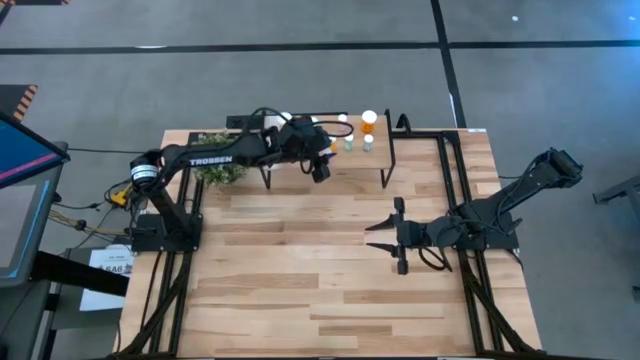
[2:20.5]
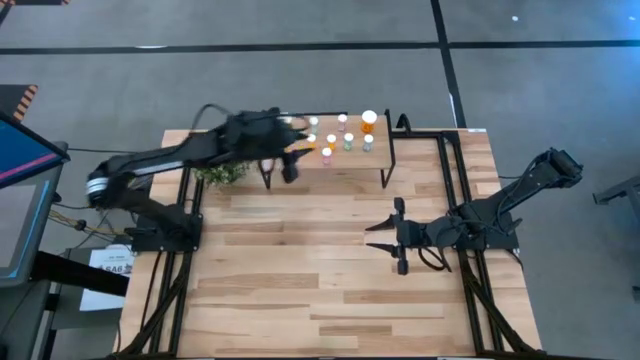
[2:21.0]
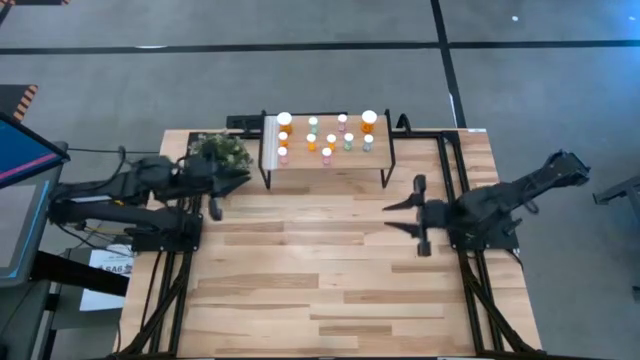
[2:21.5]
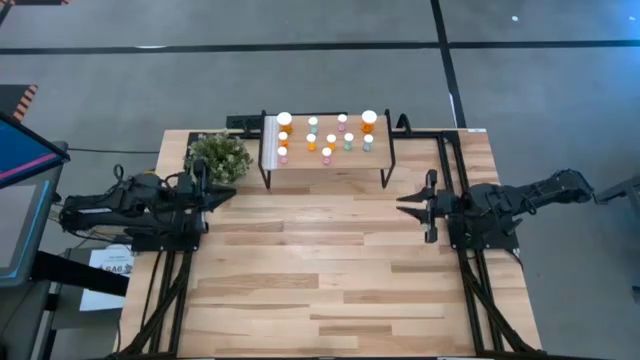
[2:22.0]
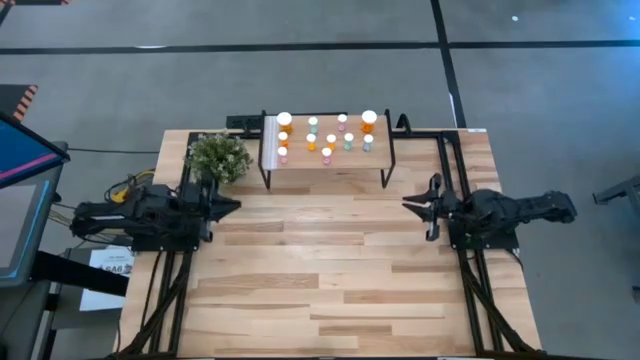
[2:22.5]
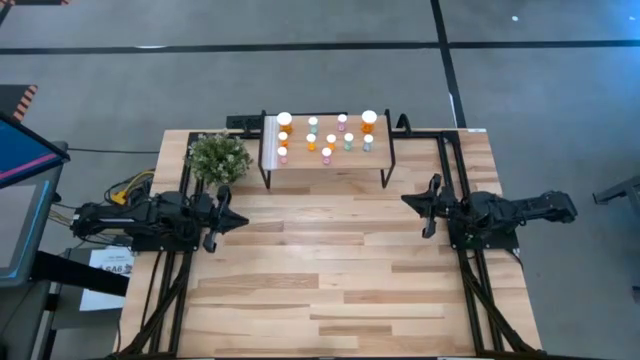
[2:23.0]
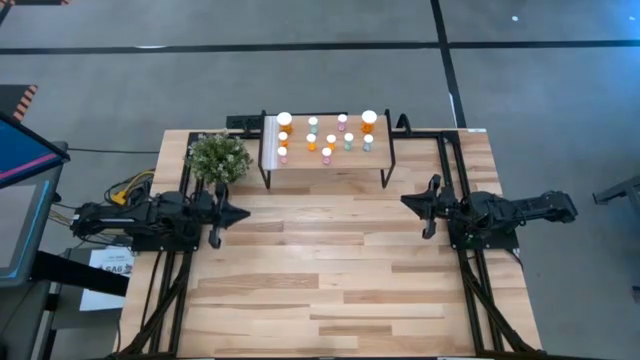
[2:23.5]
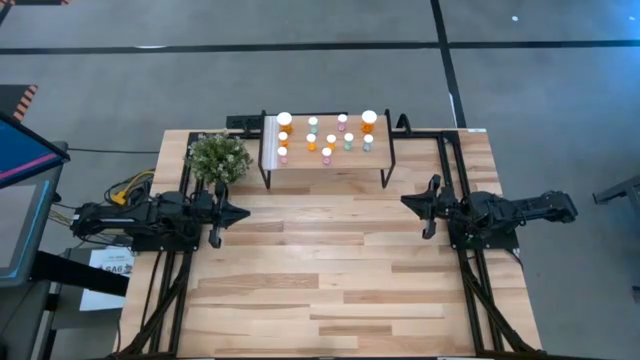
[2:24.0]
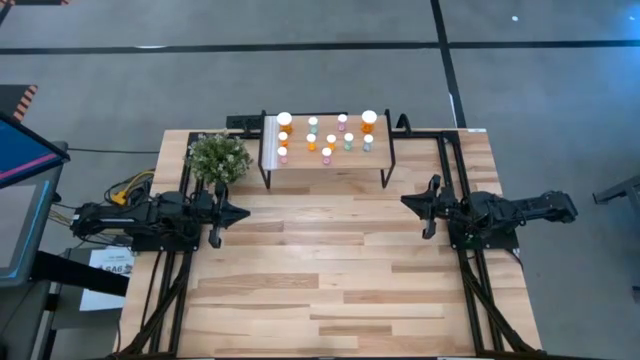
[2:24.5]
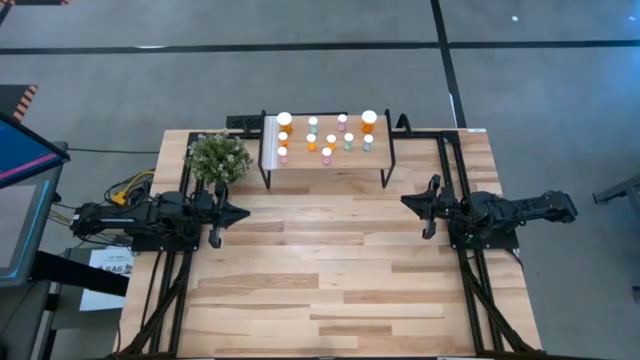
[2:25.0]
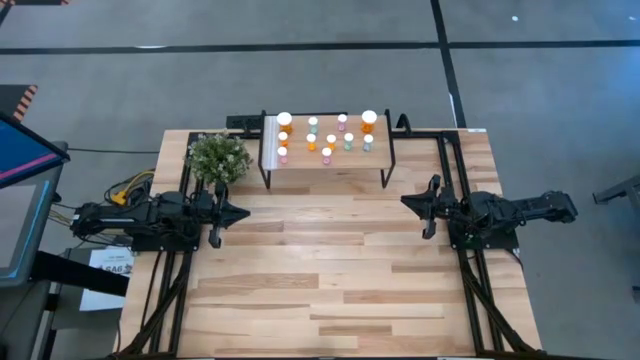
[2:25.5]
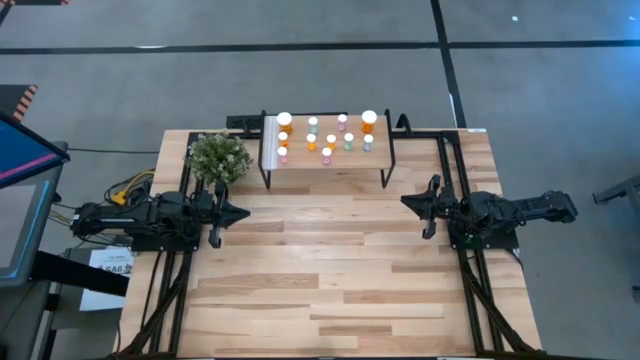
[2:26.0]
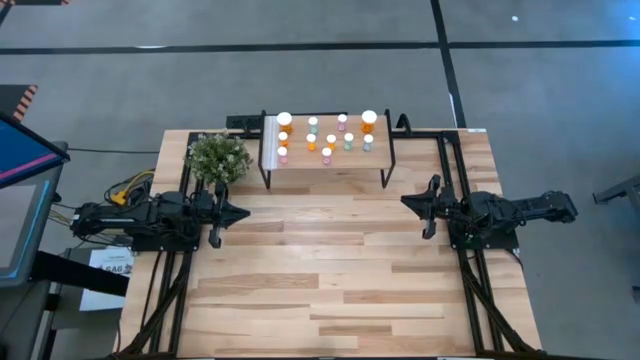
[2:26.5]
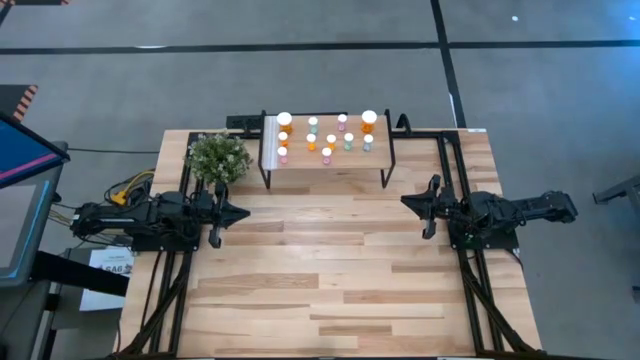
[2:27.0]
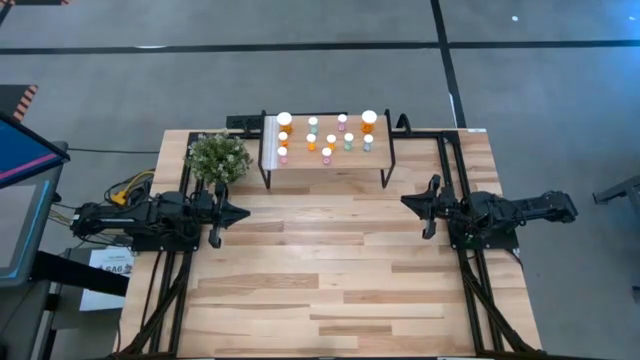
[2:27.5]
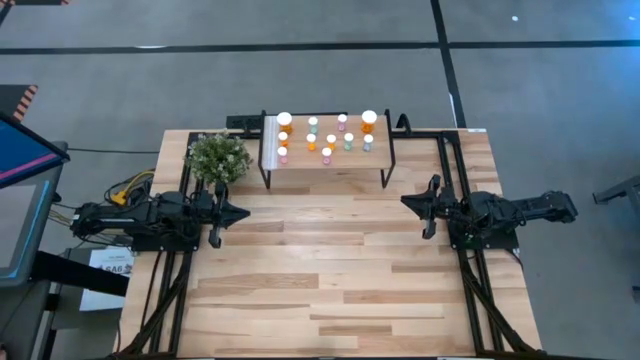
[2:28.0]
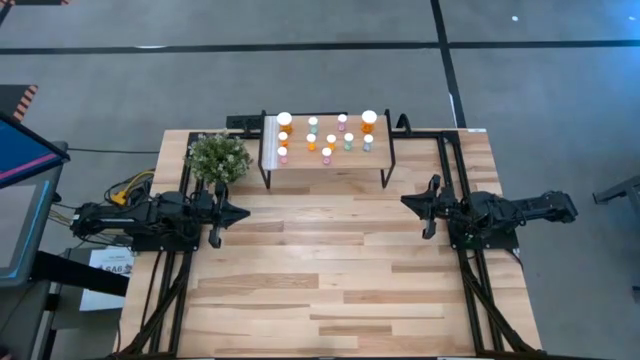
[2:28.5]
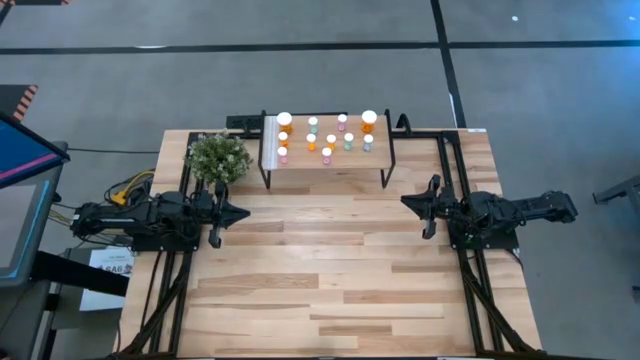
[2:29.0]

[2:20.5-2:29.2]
Task: Pick and place medicine bottles onto shelf by color
Return to Home Position

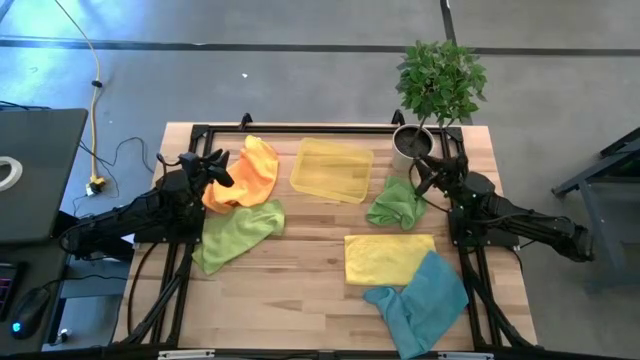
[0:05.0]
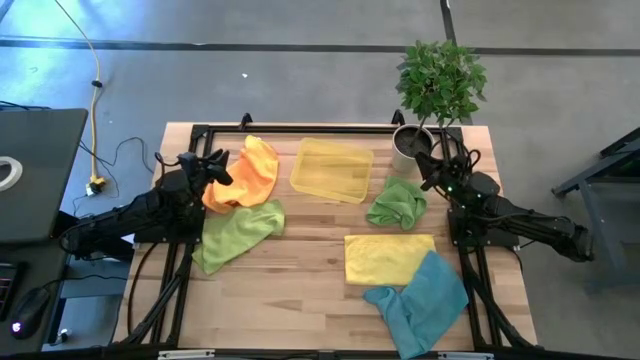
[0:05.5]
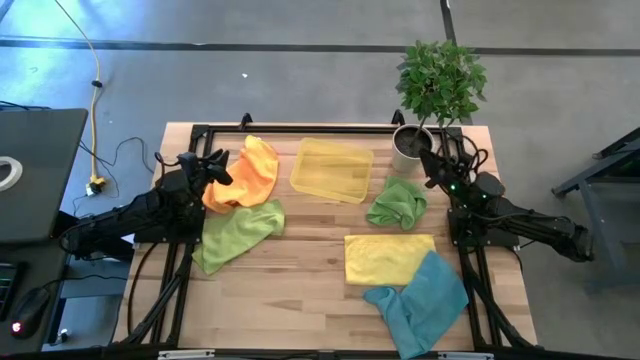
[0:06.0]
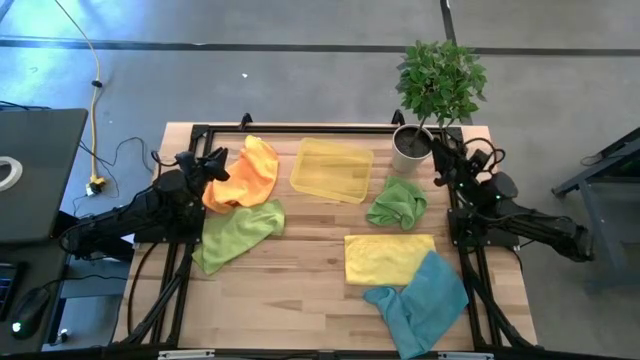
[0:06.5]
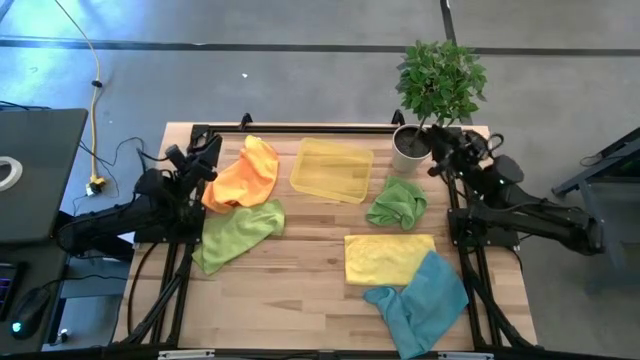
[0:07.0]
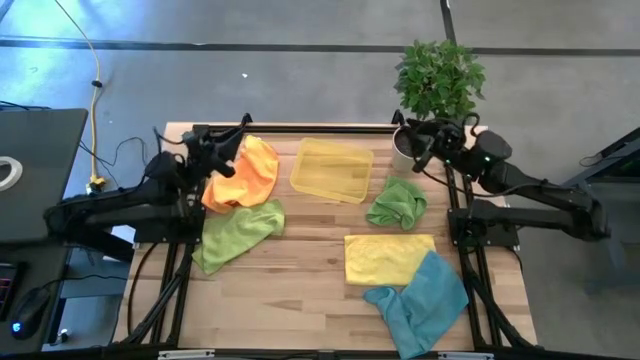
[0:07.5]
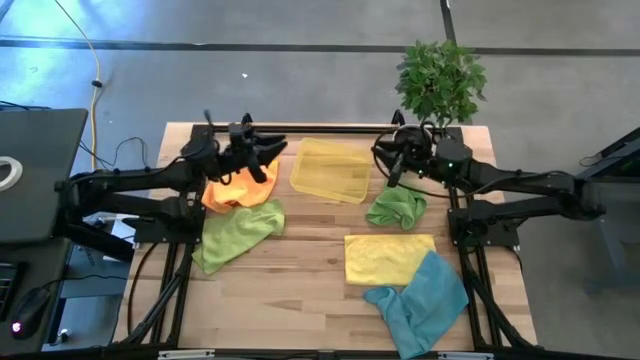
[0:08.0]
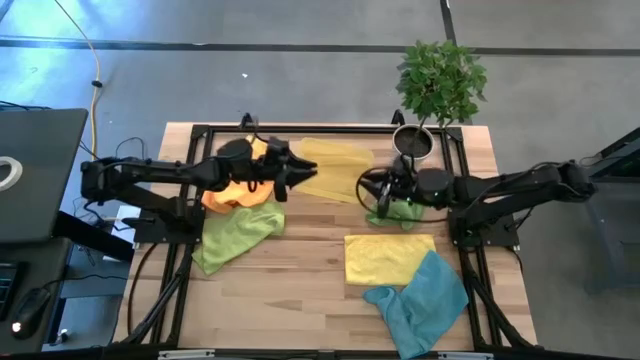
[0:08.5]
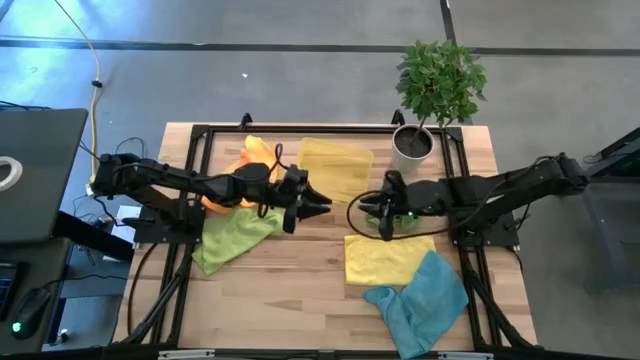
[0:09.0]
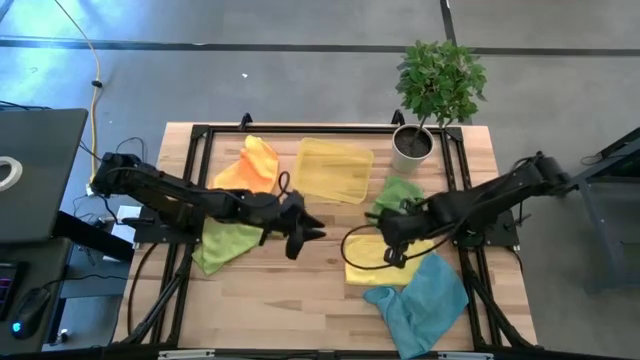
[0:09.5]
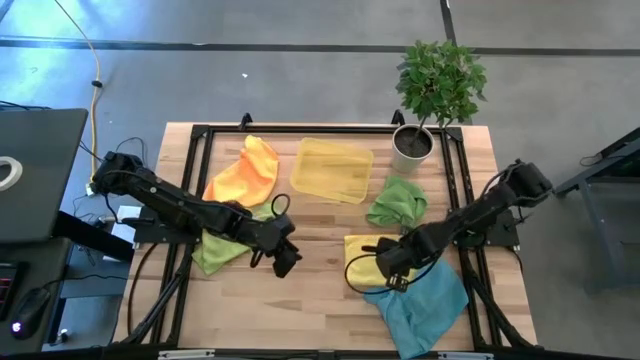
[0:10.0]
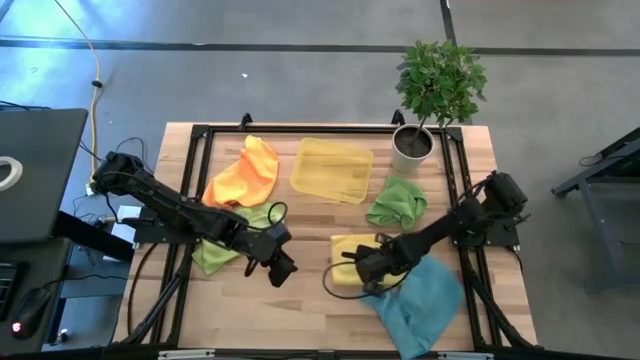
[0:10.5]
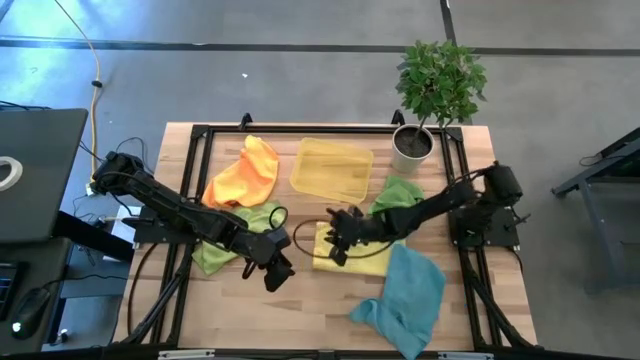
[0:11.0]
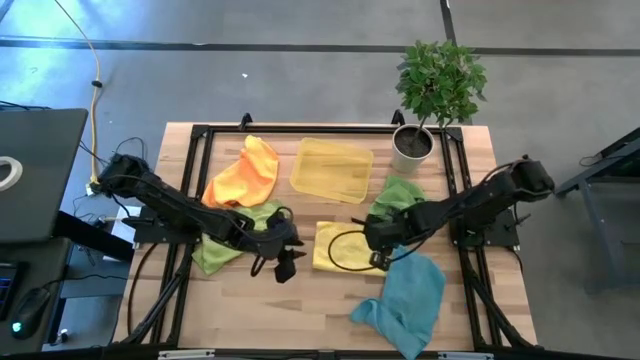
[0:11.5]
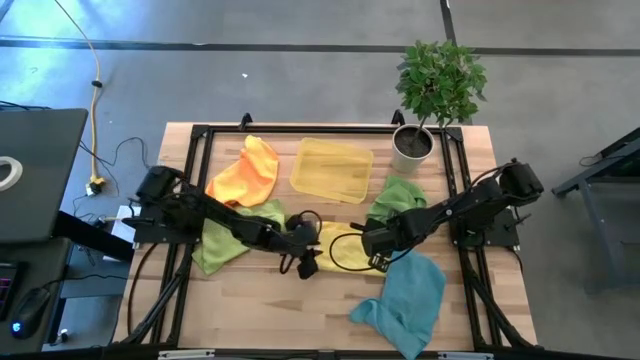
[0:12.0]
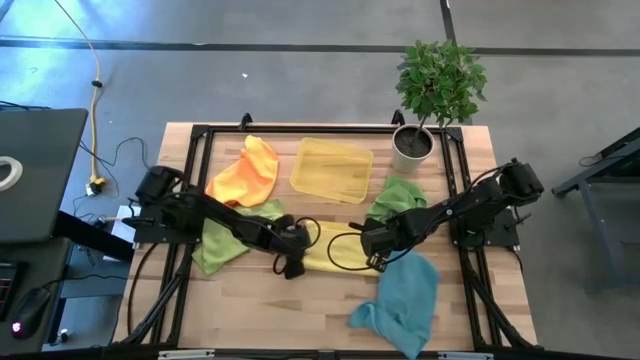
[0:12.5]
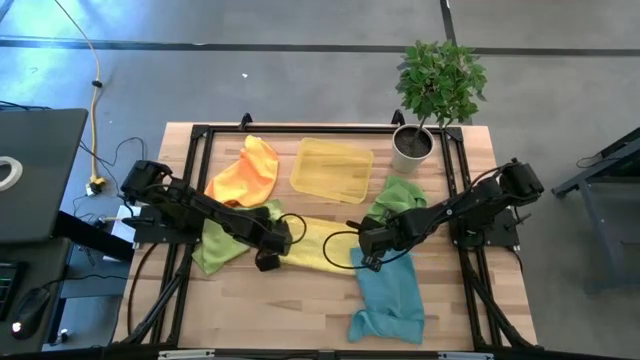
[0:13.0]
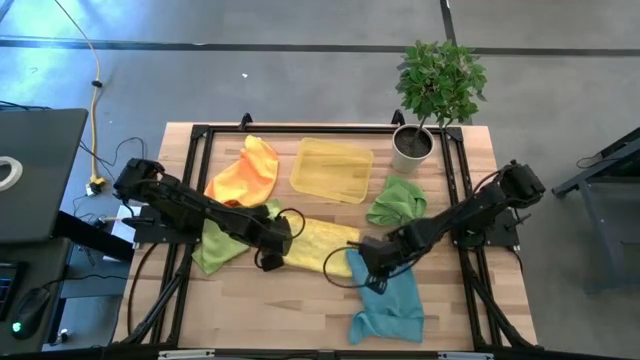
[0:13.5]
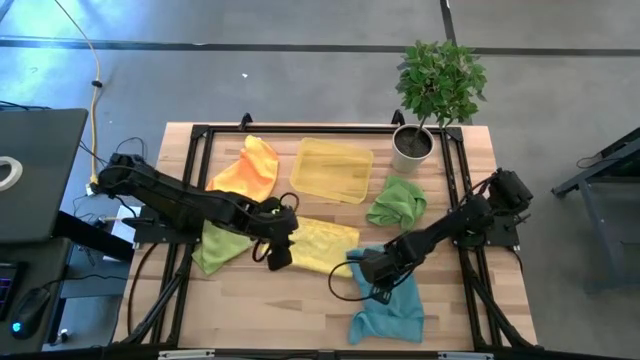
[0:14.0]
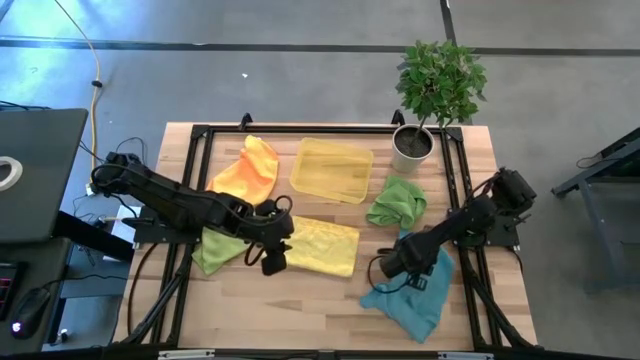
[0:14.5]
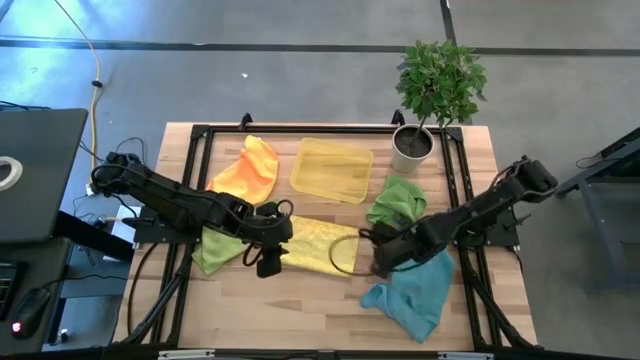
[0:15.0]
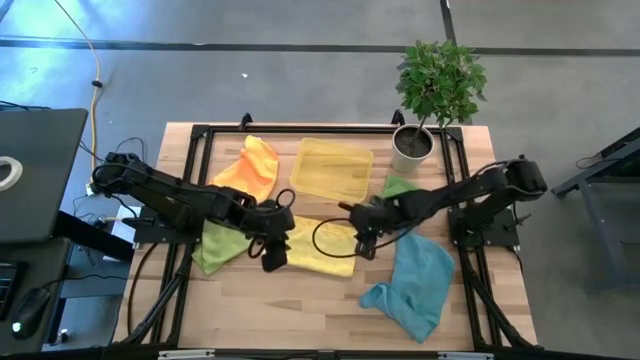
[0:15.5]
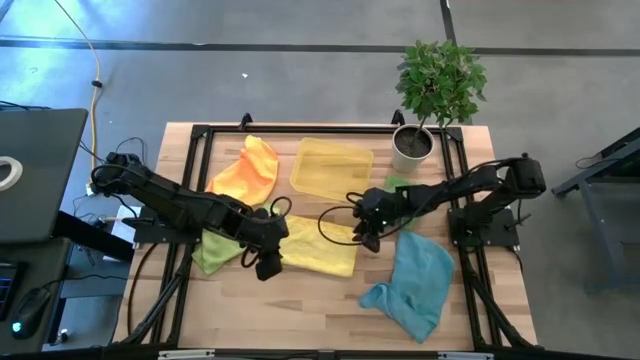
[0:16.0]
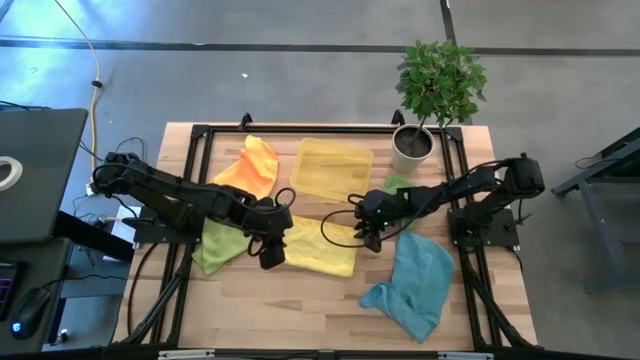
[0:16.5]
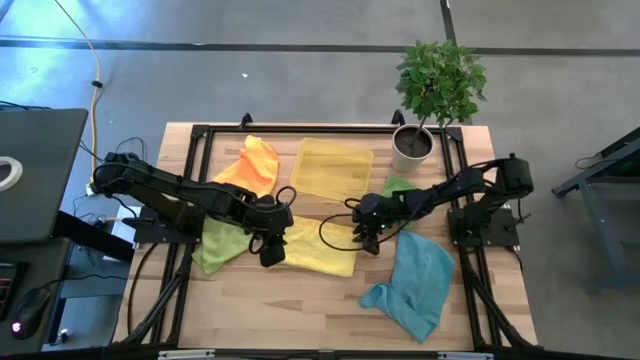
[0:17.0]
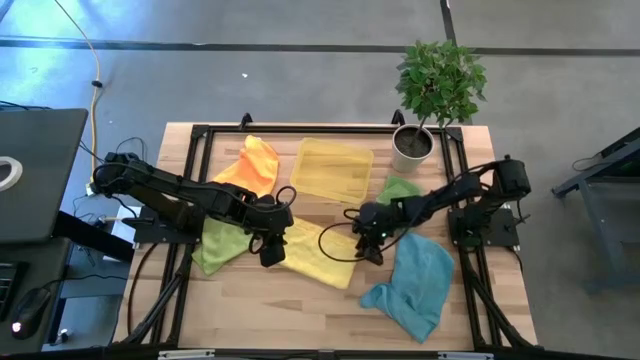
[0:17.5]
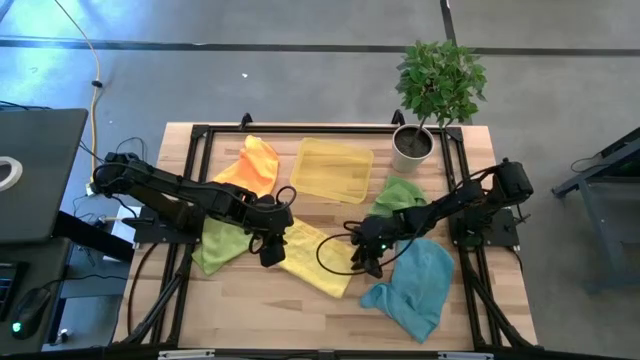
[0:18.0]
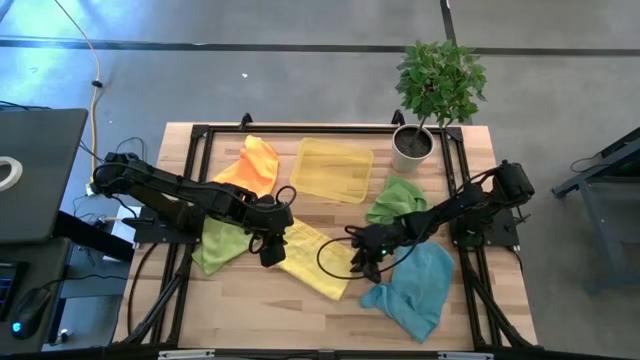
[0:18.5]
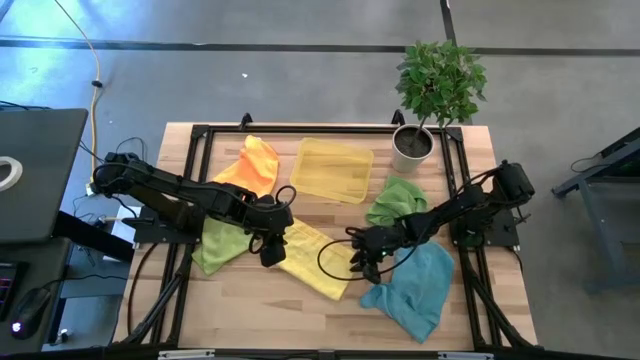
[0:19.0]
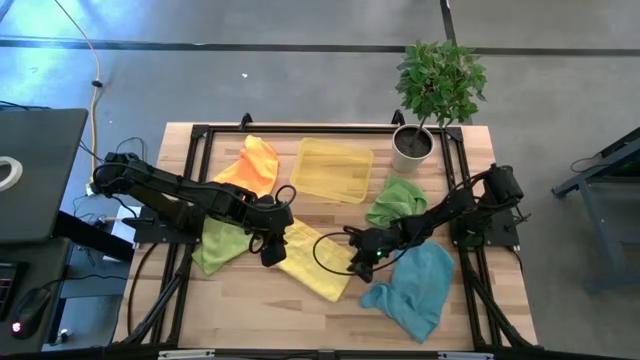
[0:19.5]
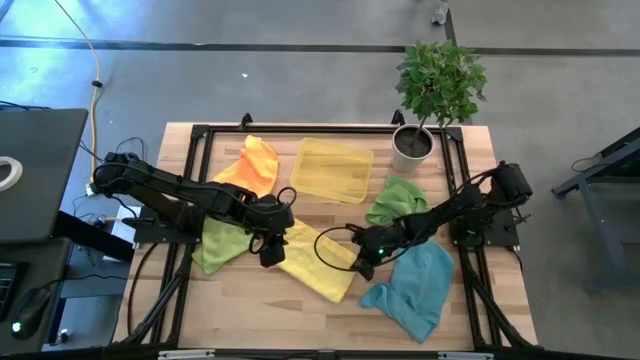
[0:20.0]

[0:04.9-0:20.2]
Task: Fold microfiber towels
Fold the yellow microfiber towel
